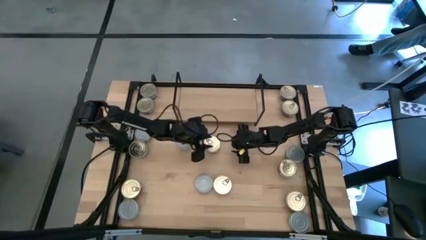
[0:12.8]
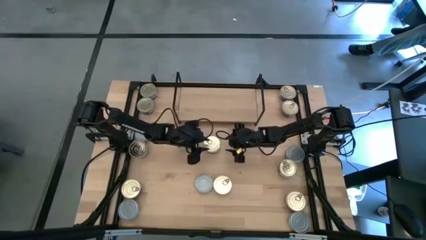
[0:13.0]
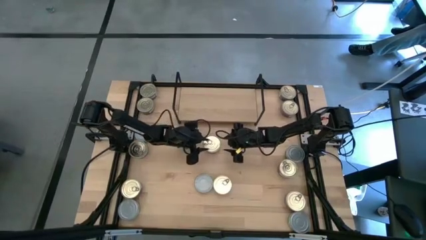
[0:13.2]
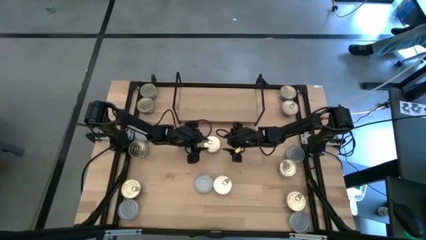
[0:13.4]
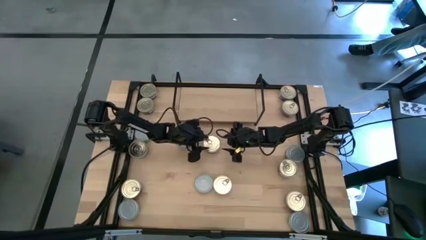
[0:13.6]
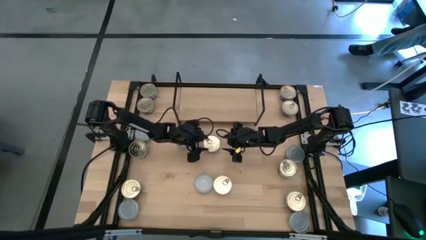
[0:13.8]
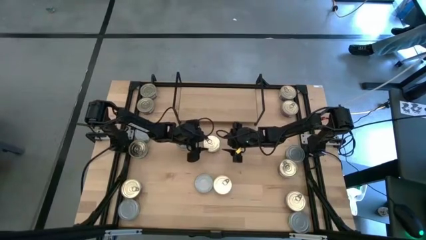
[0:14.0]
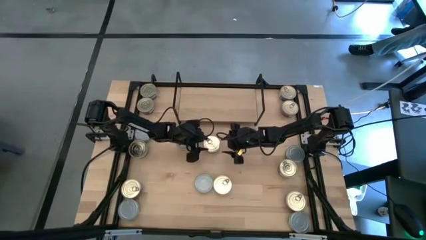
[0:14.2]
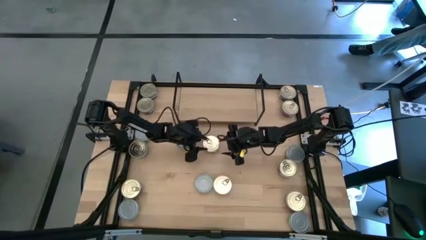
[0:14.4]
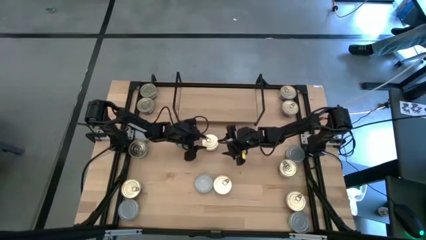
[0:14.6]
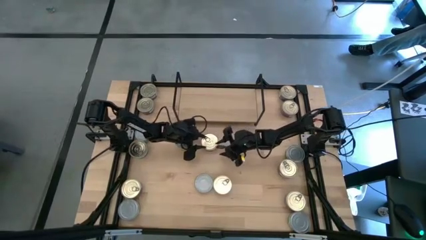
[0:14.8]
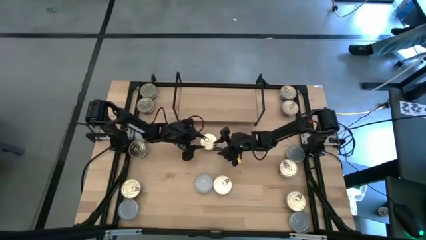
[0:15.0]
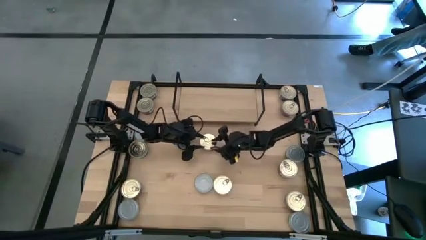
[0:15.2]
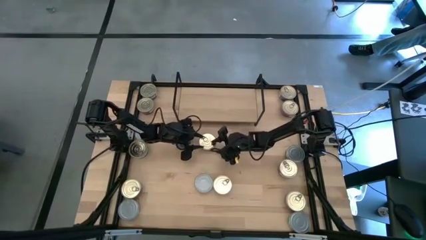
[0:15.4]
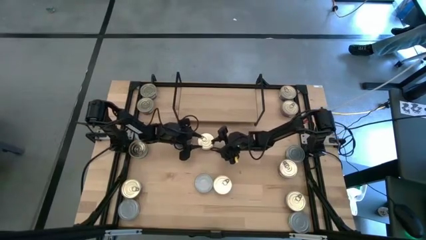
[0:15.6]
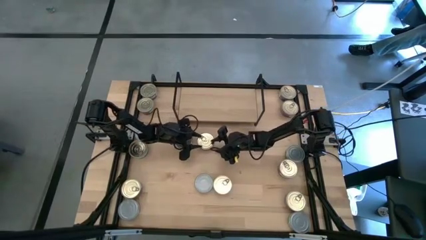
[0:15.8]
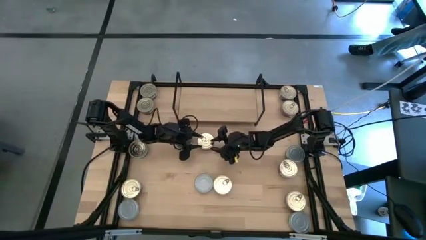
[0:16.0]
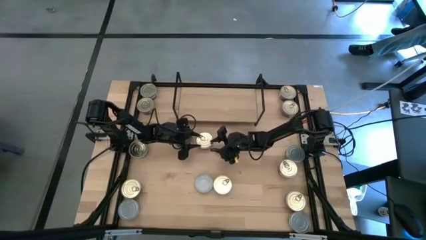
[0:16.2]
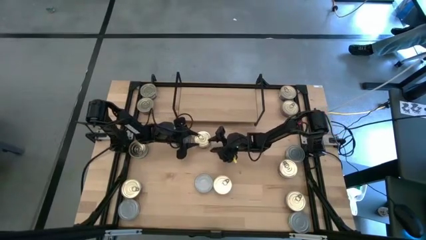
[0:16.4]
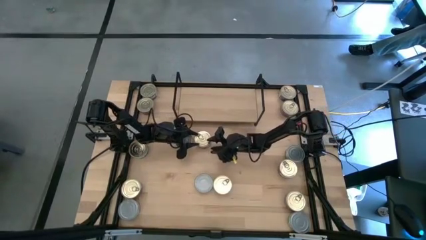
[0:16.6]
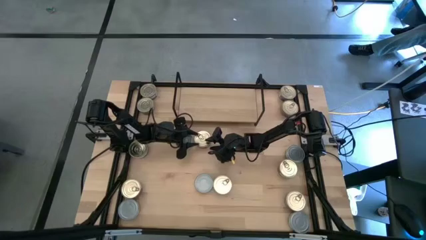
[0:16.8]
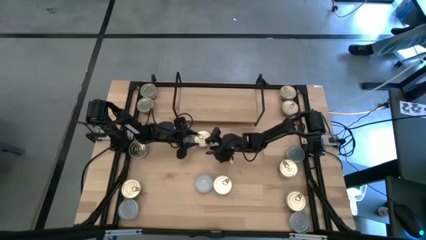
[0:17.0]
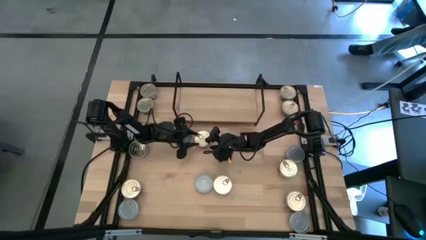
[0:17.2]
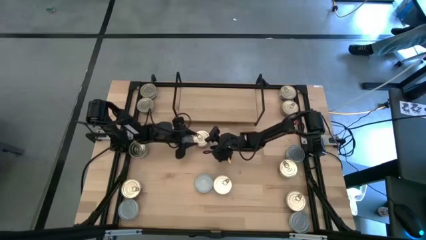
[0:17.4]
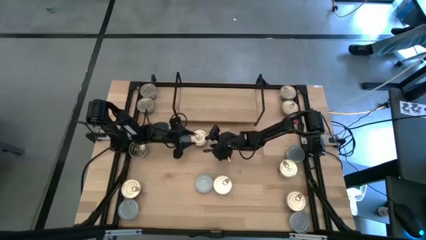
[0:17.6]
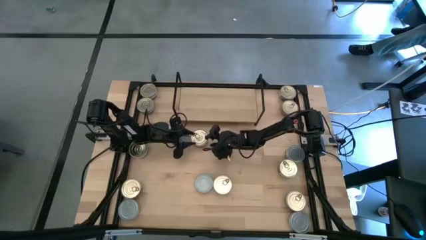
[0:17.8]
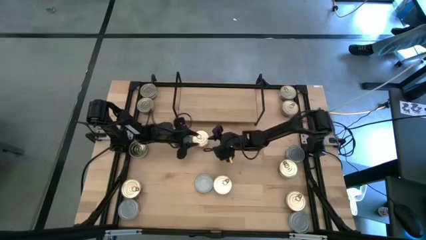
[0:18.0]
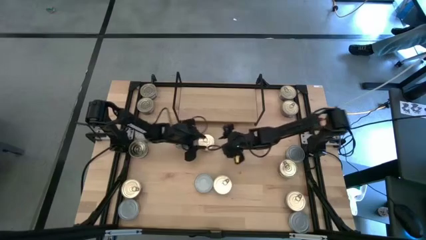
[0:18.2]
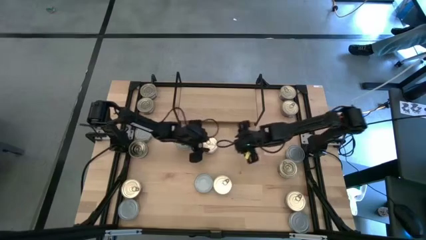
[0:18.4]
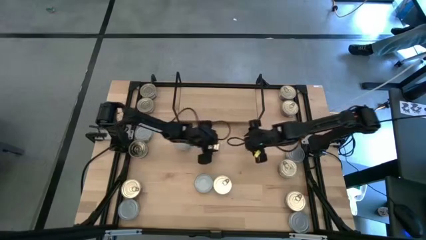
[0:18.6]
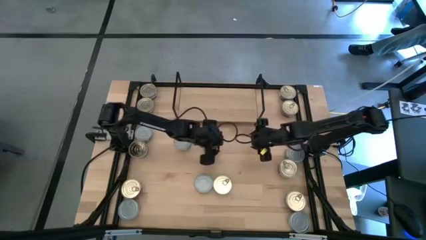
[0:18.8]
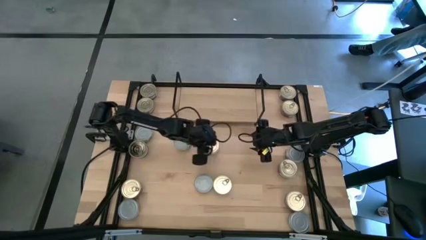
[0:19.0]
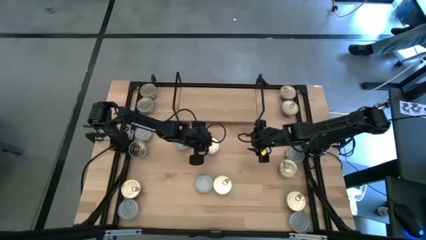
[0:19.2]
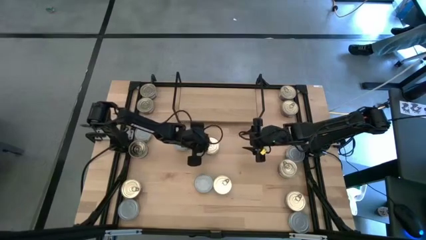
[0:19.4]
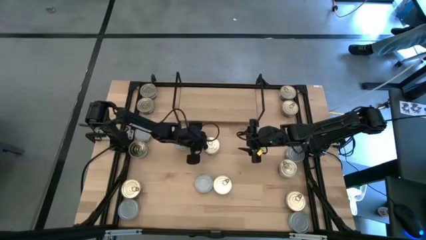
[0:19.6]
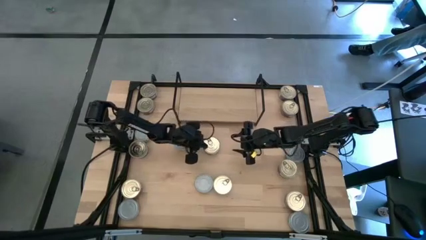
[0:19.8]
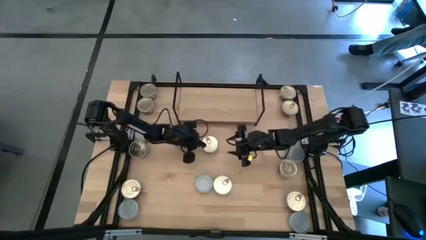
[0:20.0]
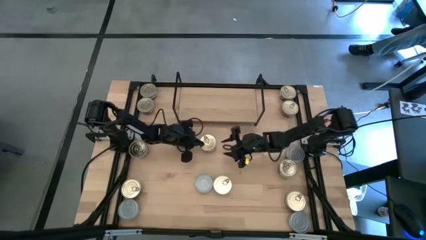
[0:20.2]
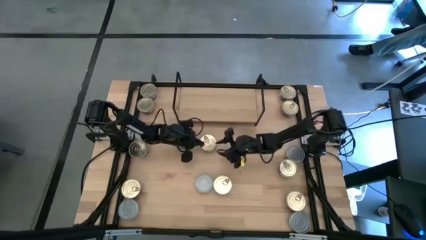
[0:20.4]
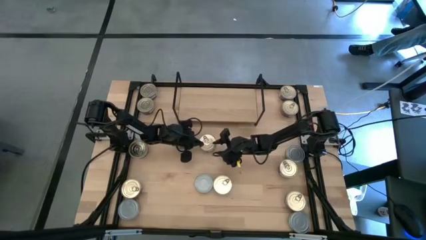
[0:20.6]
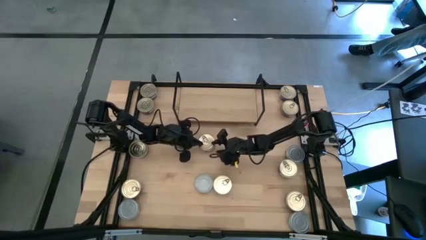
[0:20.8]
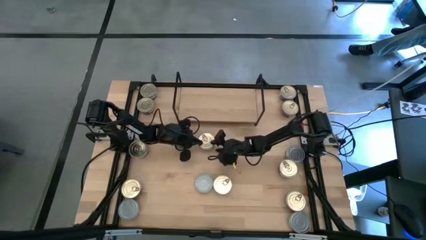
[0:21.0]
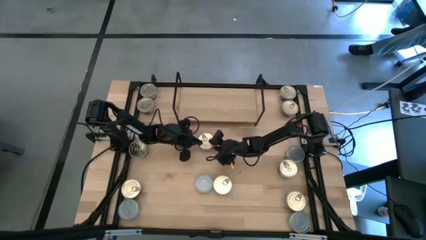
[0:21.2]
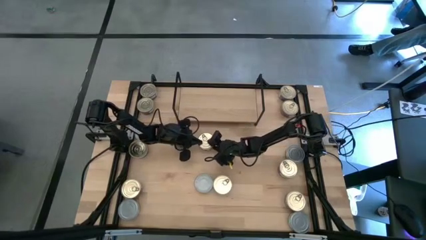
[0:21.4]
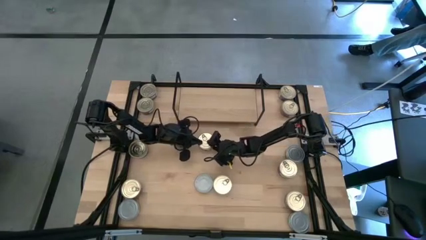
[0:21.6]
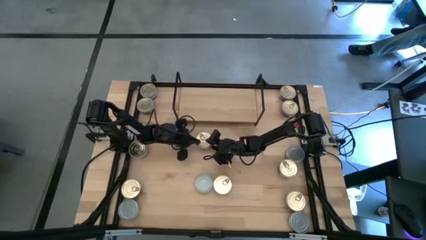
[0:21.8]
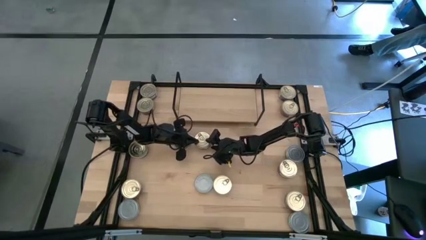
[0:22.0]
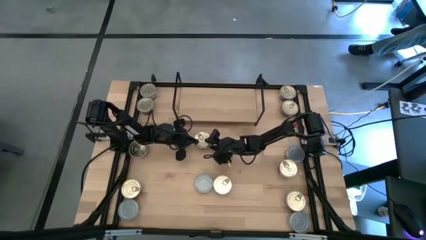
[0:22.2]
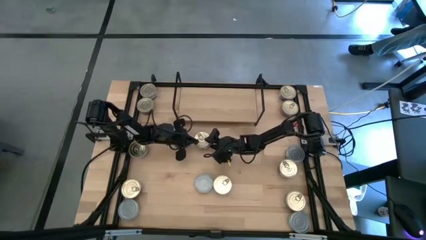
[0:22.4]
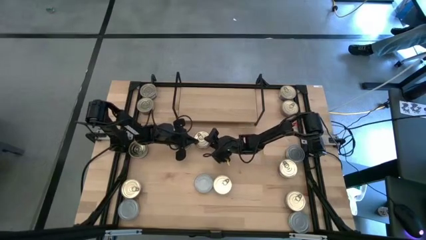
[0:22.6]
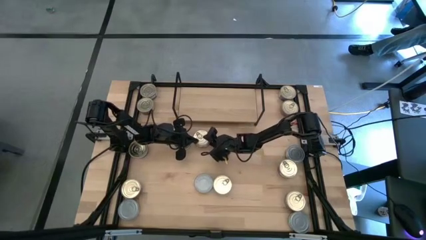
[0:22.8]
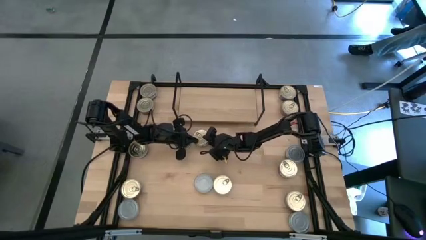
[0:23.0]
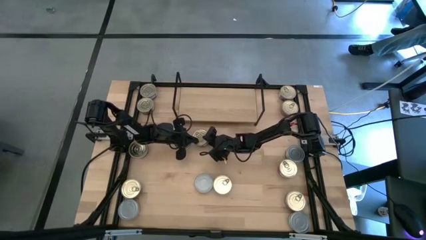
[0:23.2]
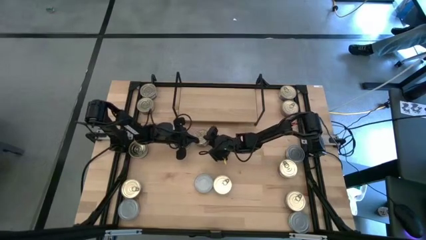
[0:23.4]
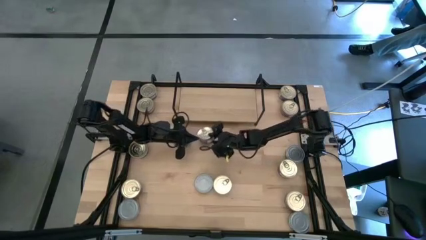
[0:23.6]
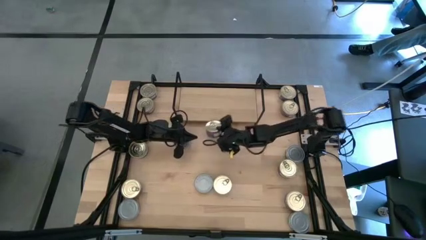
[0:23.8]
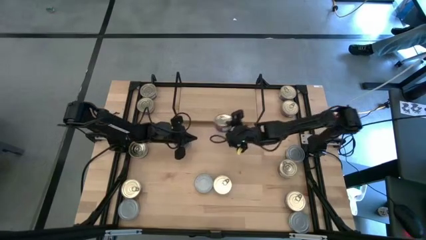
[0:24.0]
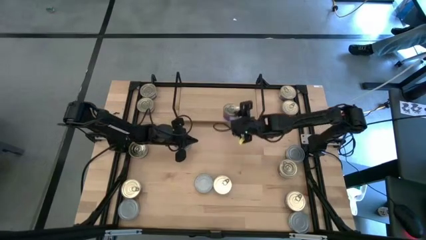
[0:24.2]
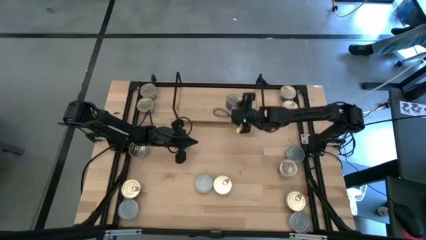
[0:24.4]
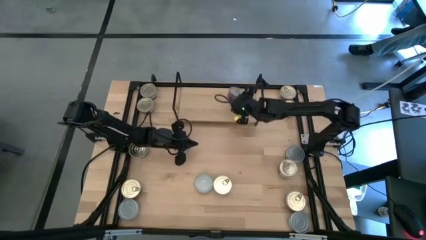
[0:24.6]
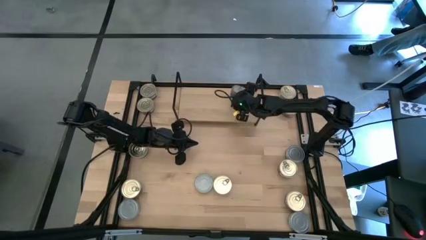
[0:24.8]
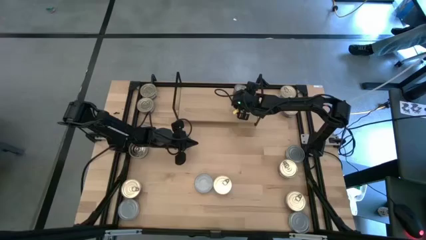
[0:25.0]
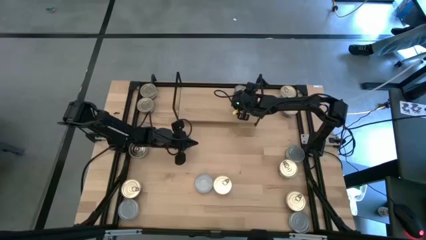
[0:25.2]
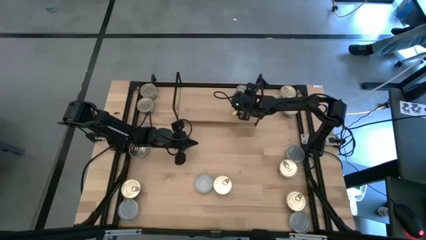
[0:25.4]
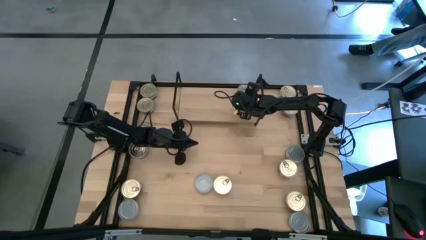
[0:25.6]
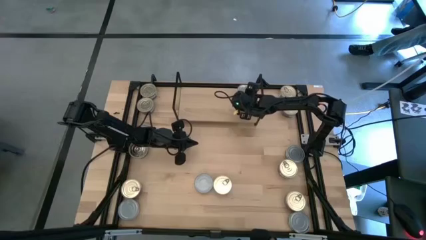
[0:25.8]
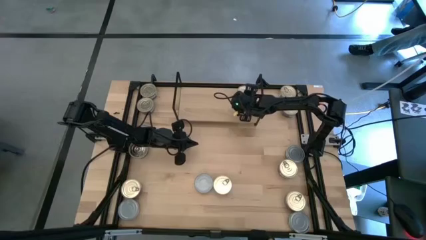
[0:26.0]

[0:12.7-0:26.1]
Task: Stack canned seafood by type on shelf
Put the blue pink tuna can on the shelf

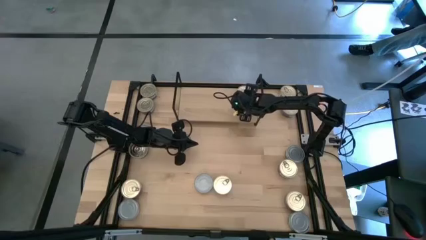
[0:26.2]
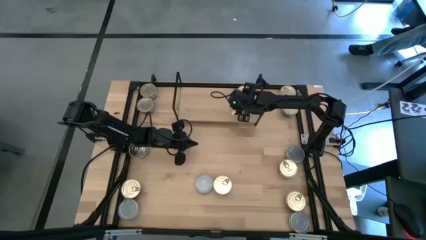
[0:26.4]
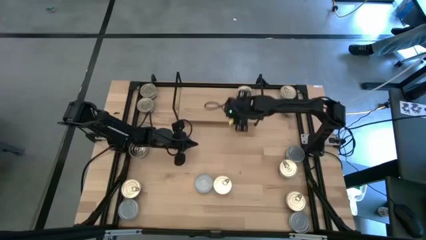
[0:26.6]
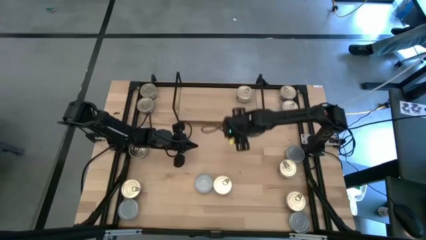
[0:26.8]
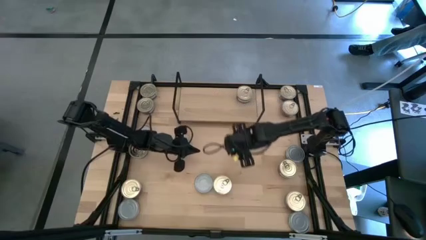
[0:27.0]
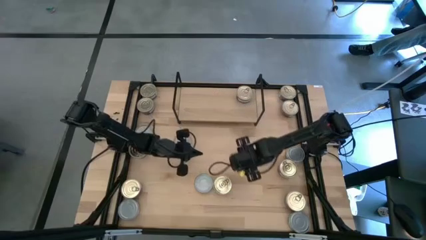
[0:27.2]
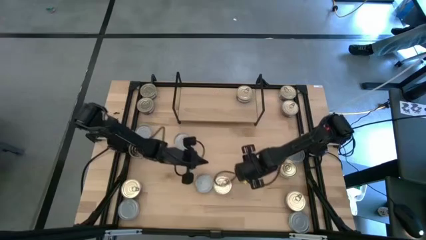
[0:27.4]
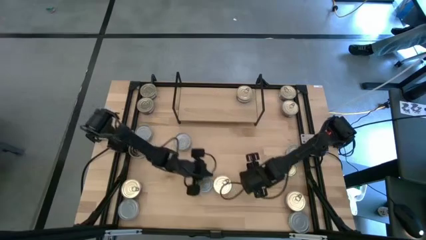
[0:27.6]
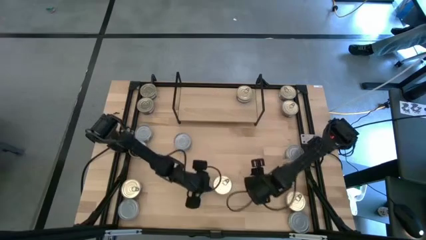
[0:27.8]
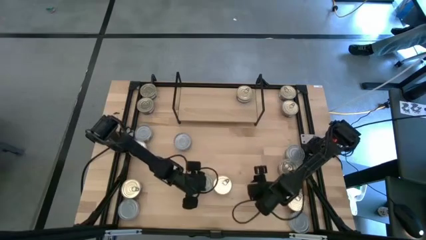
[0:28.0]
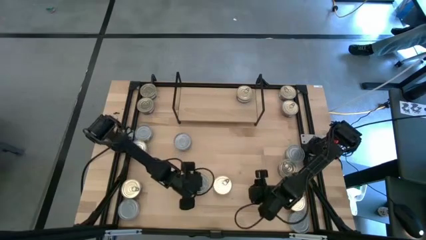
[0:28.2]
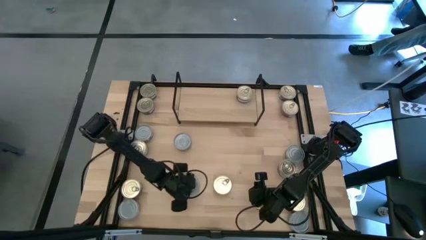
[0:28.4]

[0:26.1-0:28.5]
Adjust the green-white tuna can on the table

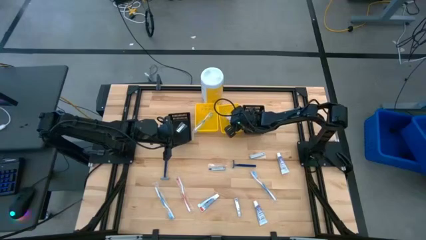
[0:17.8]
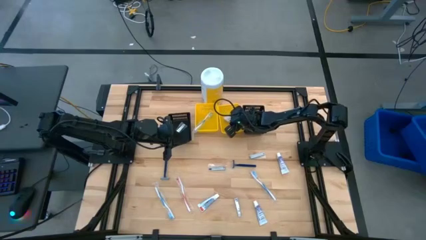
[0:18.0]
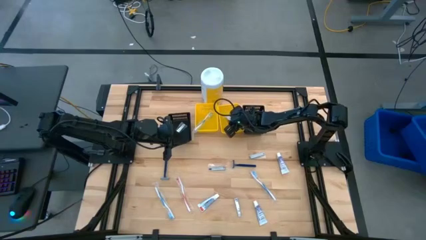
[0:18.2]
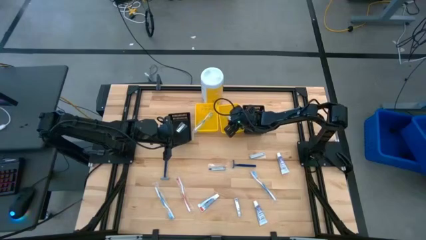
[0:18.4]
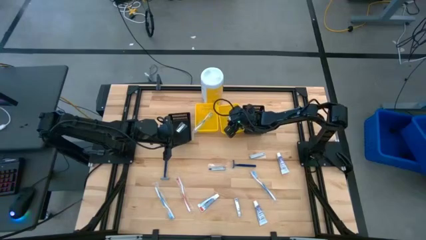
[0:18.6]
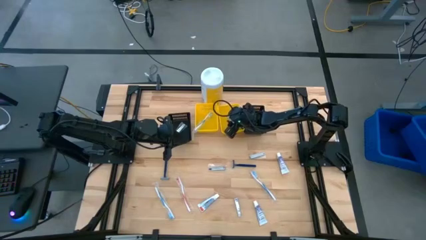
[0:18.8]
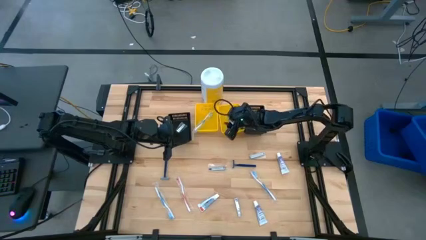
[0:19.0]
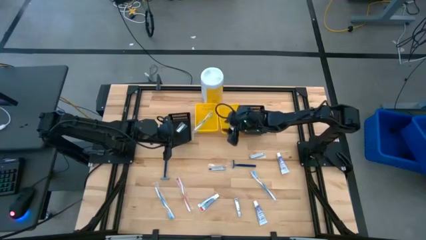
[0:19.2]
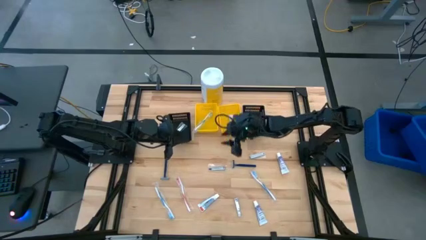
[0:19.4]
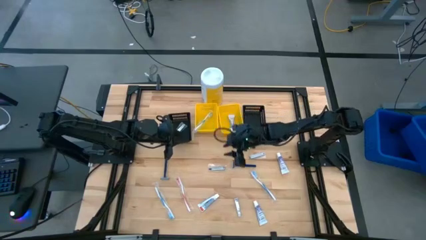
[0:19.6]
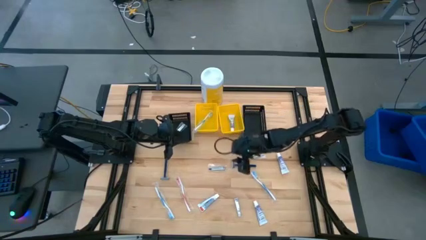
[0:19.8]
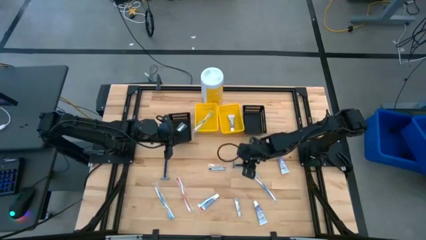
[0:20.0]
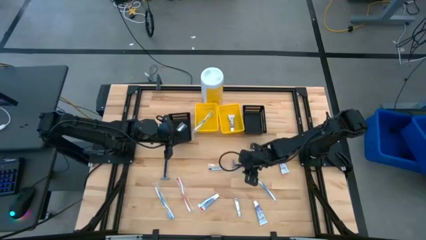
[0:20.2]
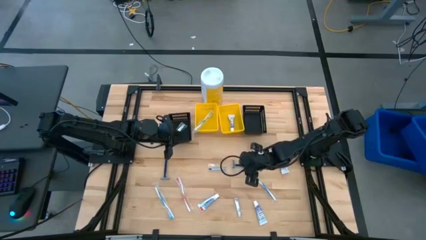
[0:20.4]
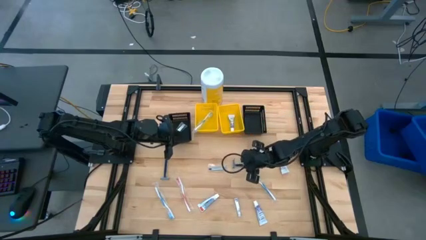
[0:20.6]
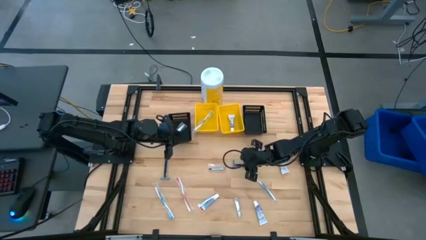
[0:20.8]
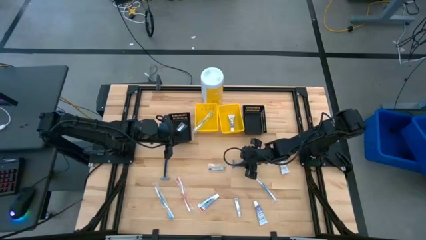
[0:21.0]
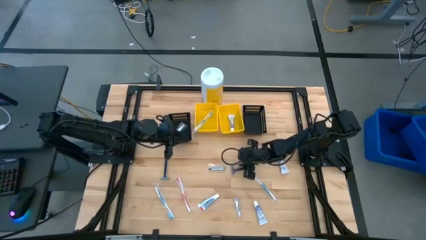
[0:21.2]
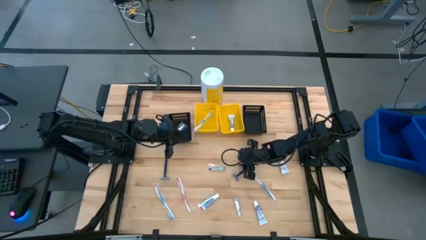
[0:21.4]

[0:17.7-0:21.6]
Task: Pick & Place Travel size toiletries
Put the blue razor into the right black bin
